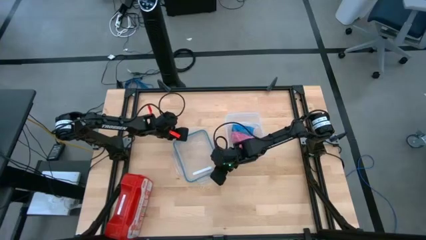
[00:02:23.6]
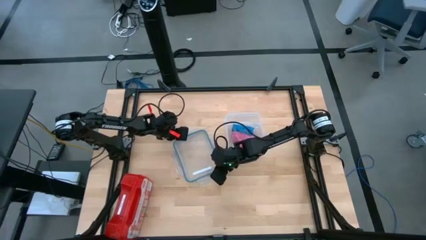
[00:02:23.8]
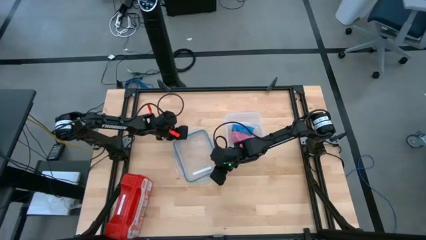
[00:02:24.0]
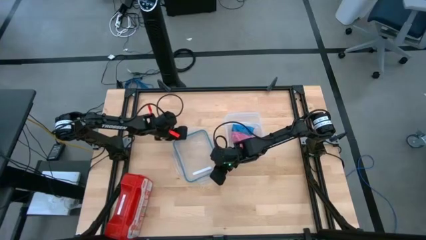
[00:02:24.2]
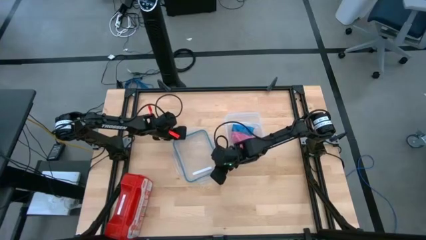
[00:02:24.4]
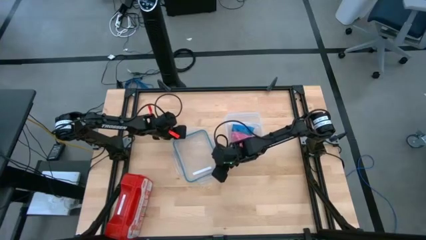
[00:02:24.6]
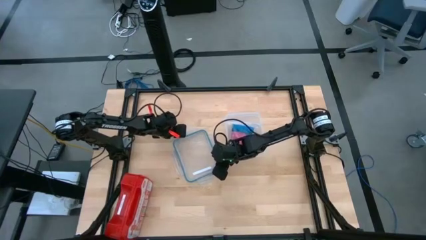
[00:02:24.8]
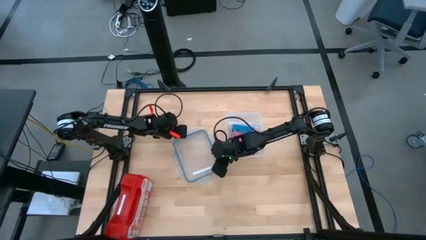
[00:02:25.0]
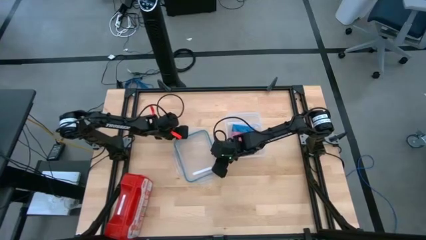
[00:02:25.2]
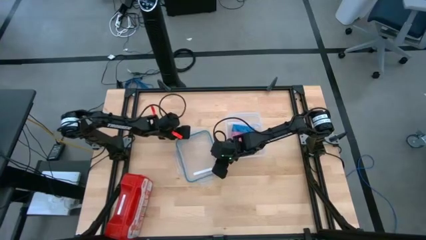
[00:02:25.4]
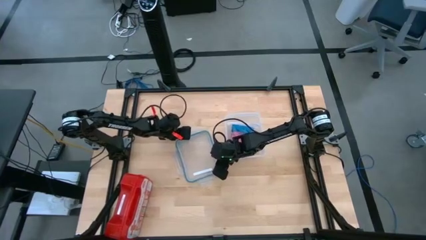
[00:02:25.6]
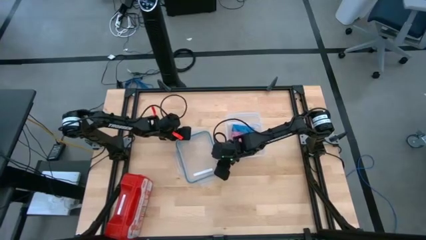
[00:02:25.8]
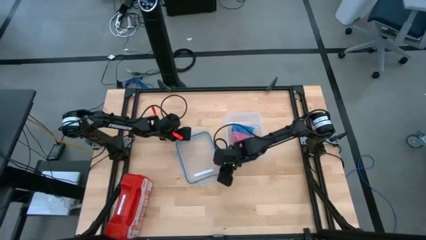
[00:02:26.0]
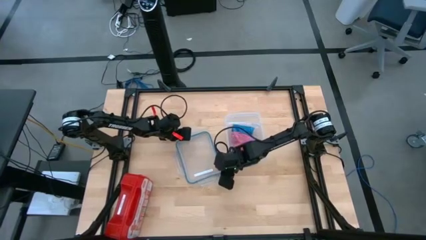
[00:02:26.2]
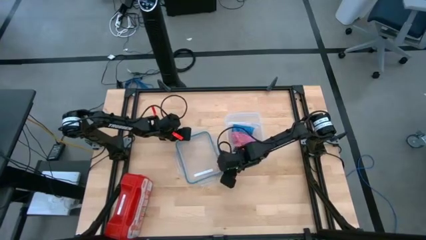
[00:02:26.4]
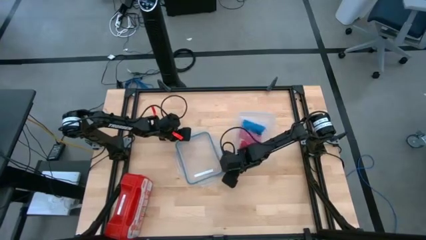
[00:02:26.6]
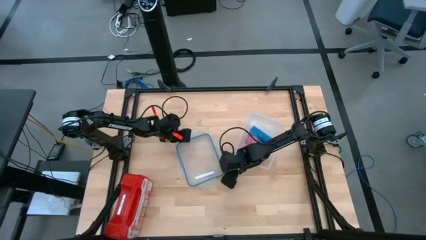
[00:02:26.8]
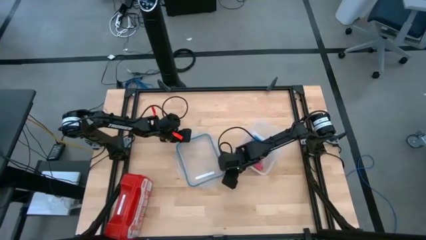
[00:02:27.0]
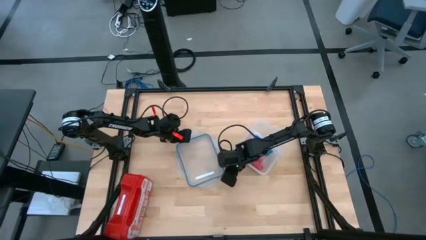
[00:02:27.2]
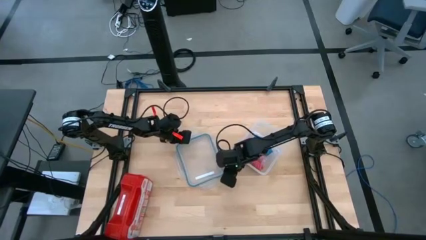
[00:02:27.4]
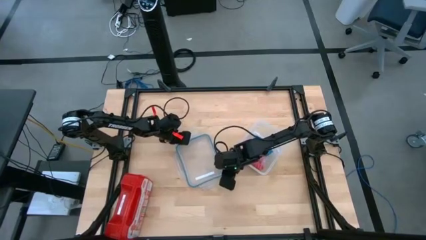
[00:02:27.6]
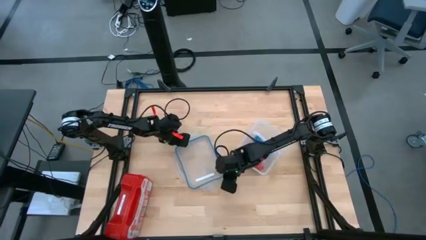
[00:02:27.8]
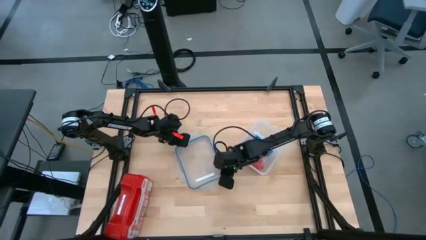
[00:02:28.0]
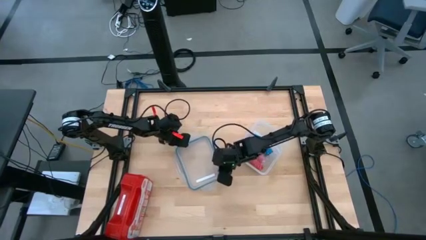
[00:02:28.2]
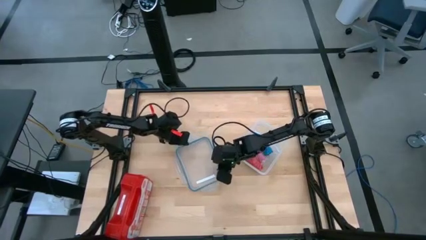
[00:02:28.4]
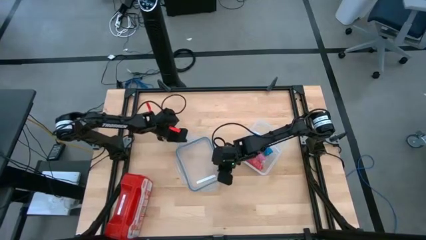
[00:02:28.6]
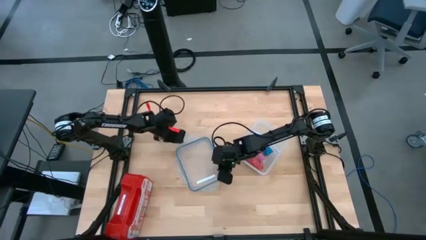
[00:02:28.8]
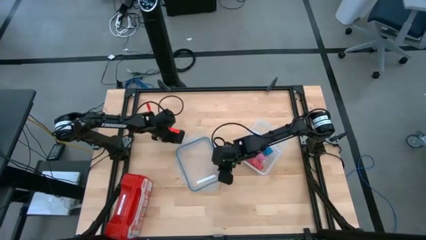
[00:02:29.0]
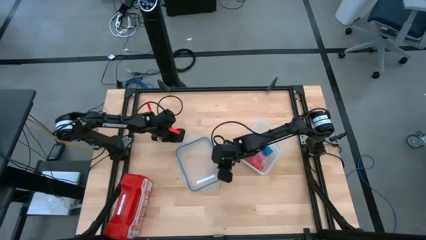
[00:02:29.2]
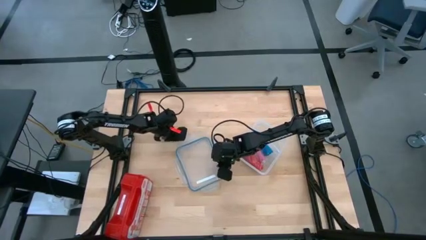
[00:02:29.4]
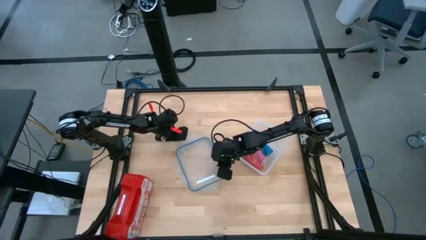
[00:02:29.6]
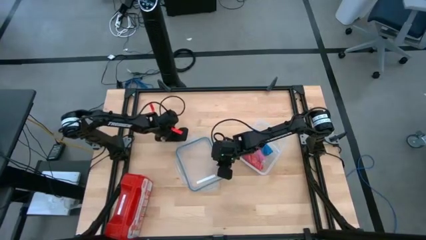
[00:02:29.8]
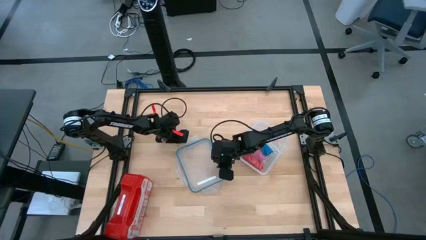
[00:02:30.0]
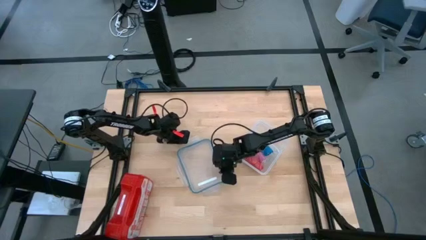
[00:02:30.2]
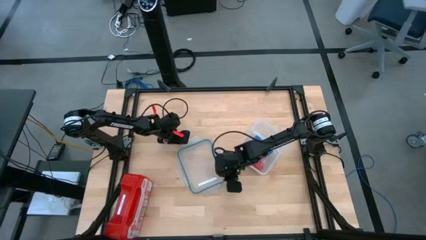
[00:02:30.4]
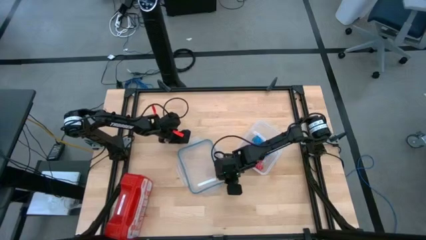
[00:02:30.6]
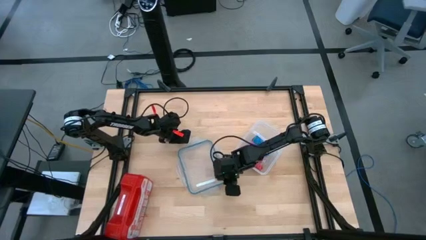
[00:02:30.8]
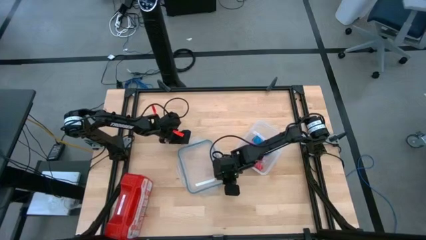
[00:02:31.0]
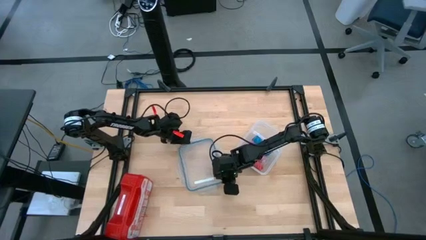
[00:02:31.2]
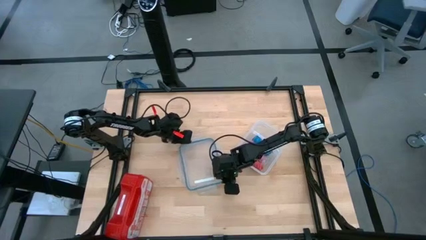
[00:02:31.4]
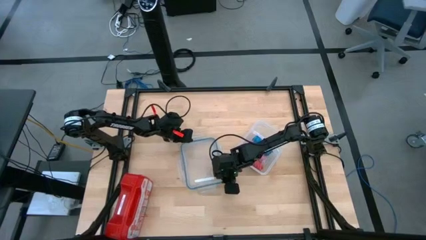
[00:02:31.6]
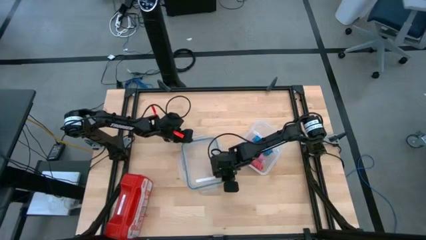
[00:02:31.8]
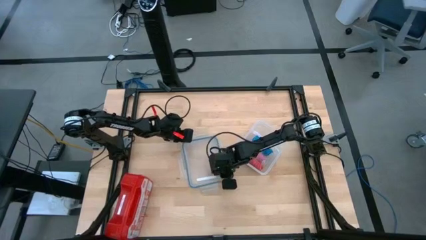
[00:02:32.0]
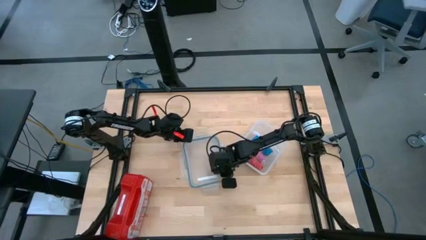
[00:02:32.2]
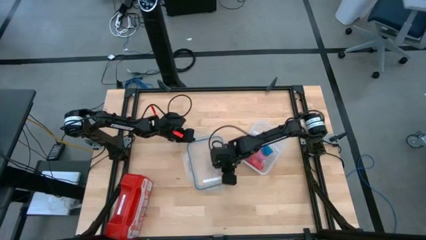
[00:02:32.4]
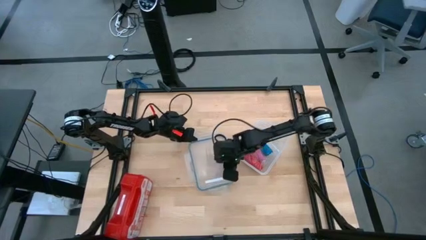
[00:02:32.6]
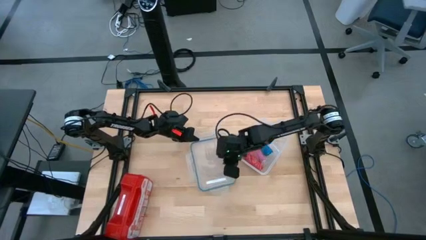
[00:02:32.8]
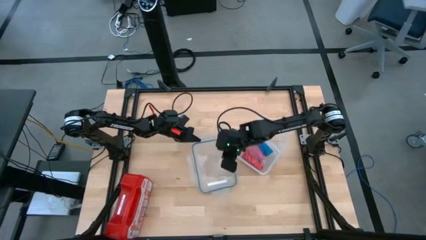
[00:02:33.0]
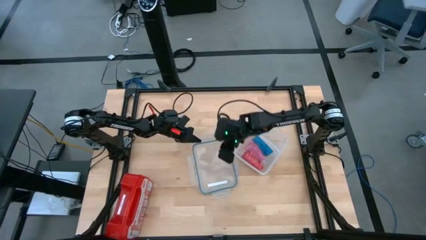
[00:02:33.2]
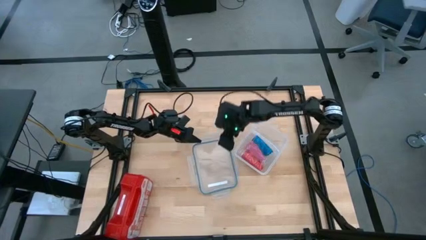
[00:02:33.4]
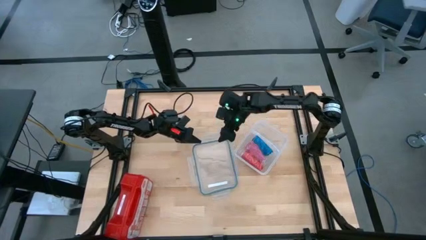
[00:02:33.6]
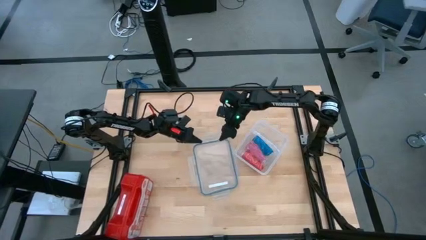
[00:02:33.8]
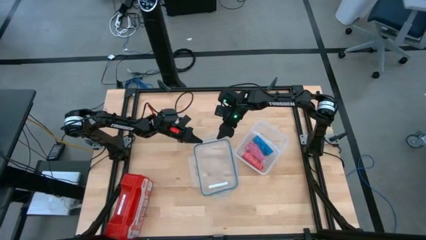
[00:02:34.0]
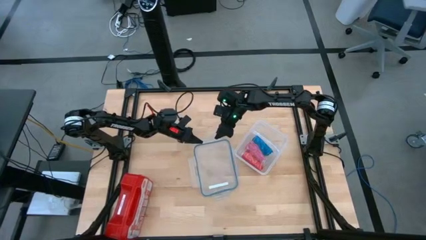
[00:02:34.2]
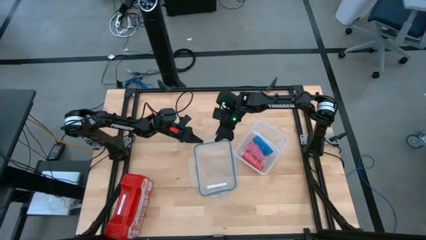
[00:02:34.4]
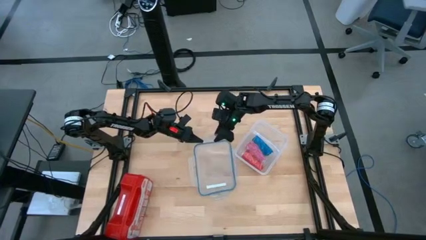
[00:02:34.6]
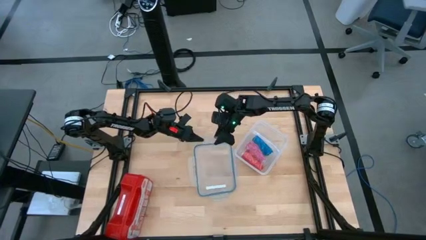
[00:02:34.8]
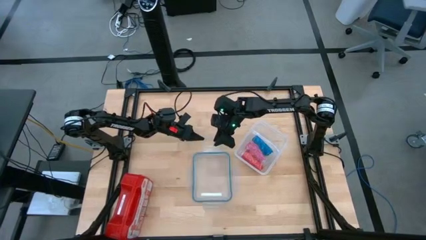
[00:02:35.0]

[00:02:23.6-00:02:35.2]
Task: Roll bandage
Close the lid of the tupperware

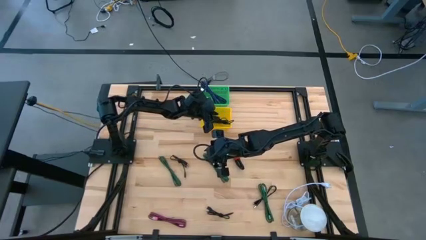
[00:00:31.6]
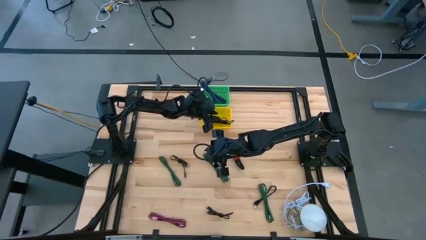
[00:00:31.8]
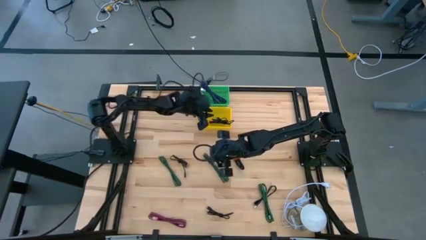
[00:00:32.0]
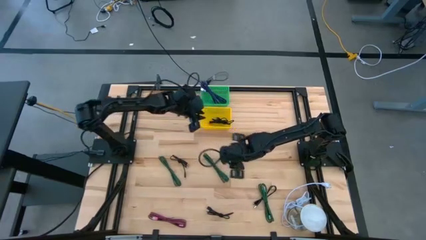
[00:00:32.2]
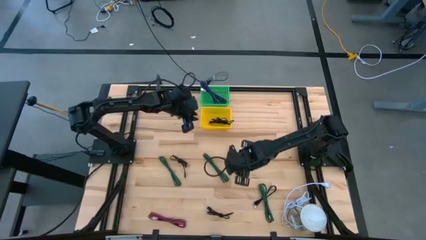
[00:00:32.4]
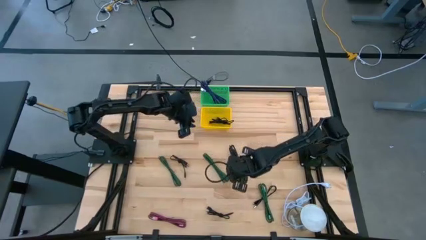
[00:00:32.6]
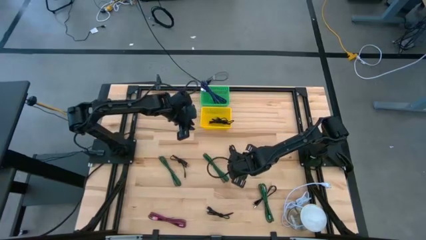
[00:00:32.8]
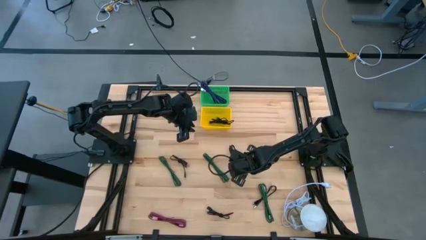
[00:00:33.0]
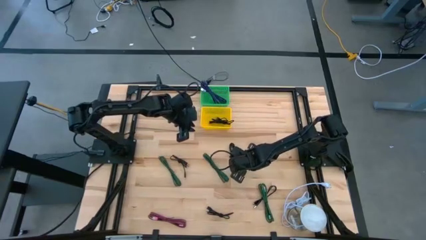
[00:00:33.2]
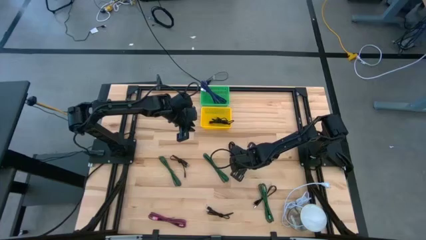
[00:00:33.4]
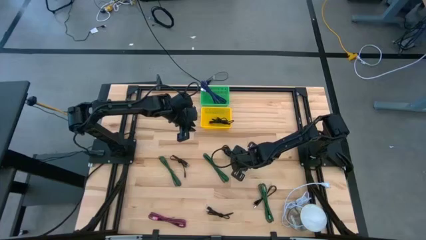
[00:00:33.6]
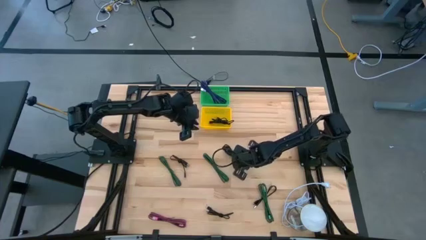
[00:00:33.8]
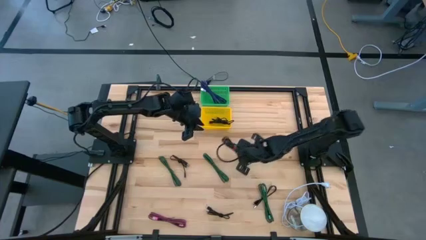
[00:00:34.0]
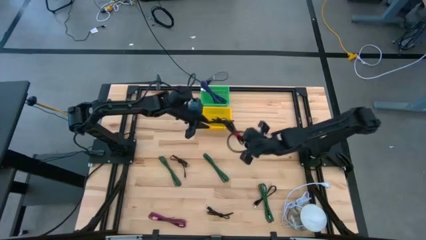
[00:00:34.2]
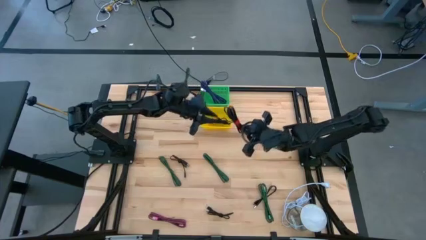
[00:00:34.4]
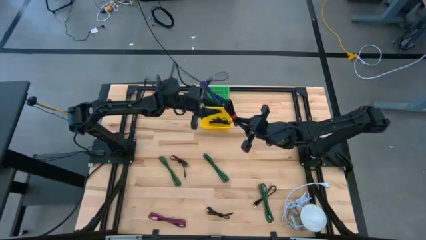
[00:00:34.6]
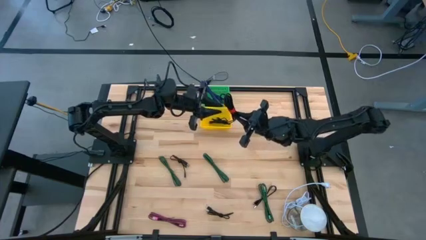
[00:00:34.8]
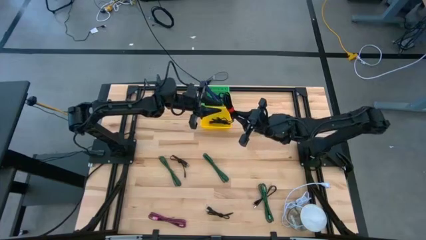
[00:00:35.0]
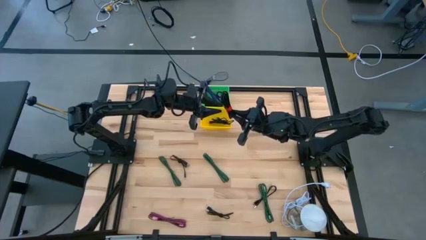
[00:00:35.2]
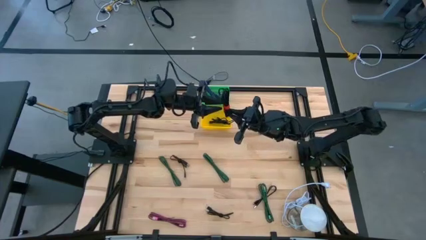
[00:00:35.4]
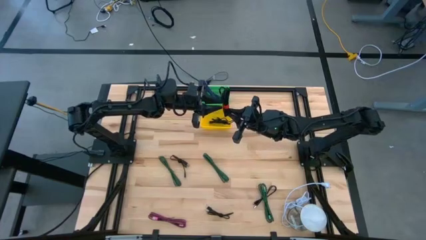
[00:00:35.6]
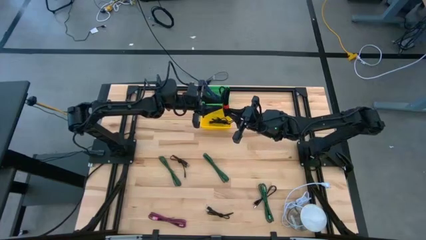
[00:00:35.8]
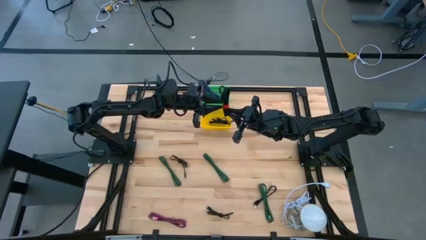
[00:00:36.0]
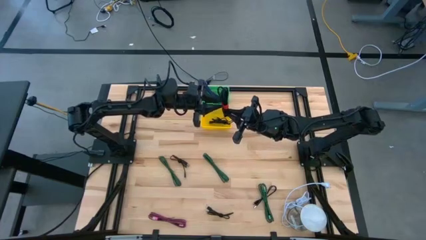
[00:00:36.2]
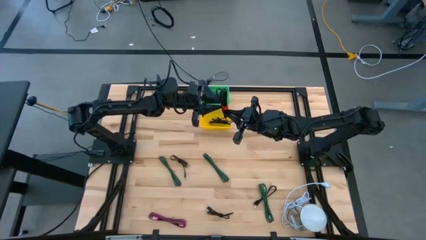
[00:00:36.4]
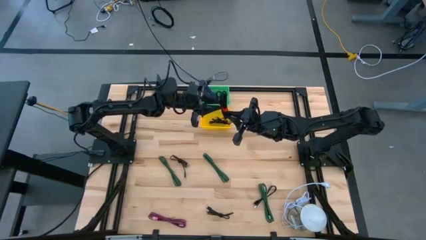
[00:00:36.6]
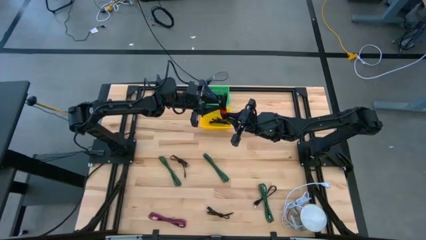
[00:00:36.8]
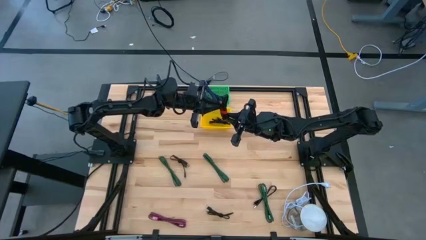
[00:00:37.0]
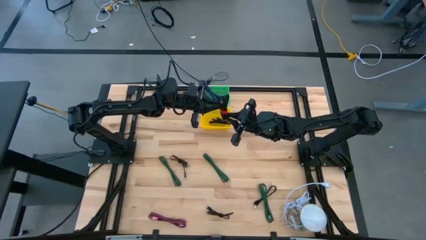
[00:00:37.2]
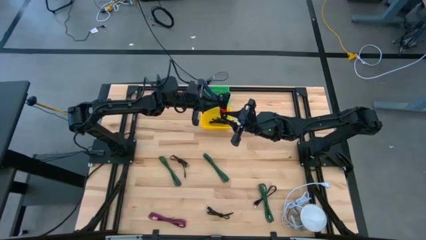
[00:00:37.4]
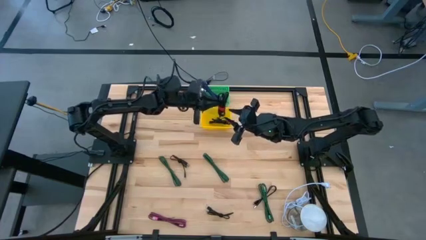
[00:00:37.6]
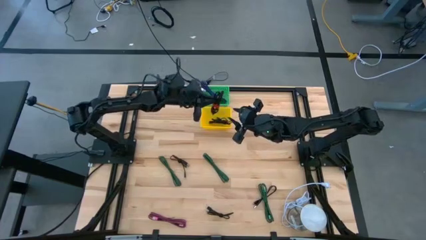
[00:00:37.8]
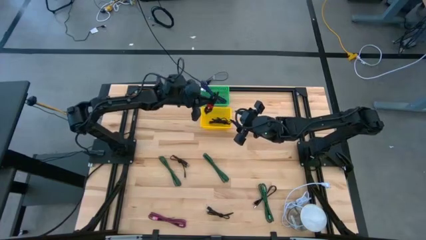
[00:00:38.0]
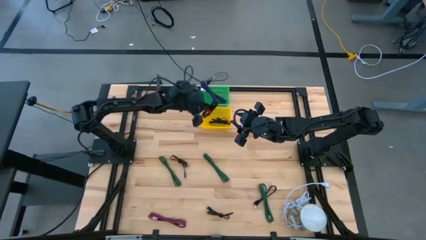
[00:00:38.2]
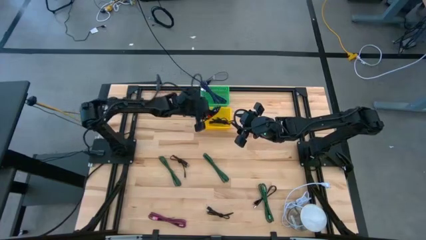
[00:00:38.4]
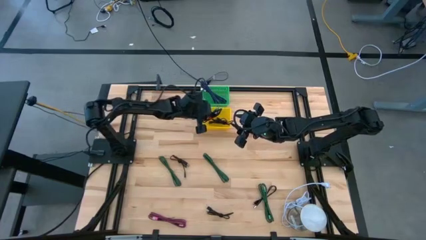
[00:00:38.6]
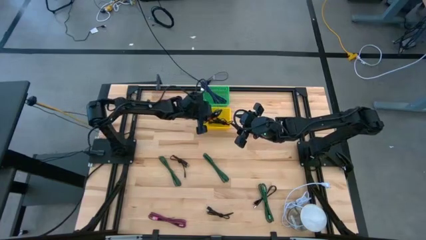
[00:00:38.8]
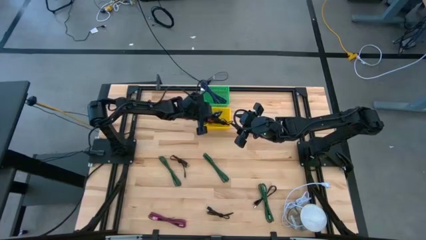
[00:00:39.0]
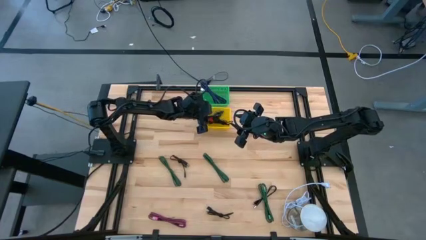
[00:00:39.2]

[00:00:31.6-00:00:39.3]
Task: Pick & Place USB Port
Put the black charger cable into the yellow basket
